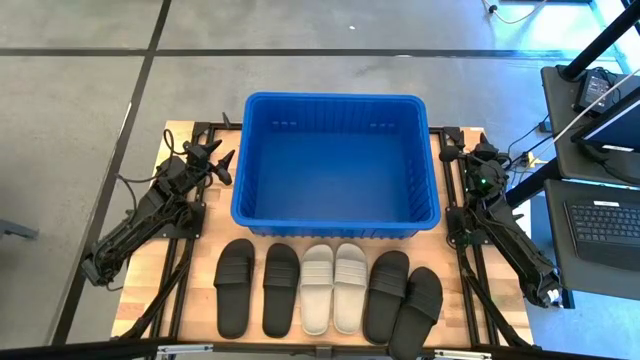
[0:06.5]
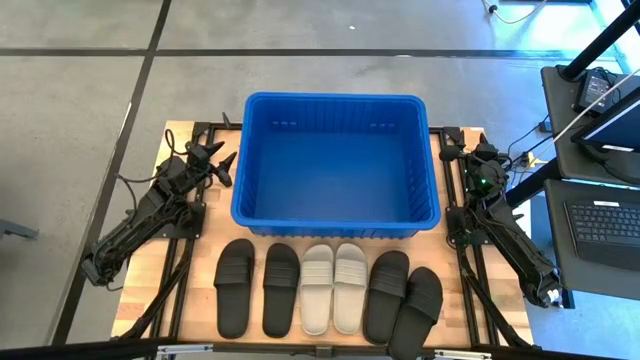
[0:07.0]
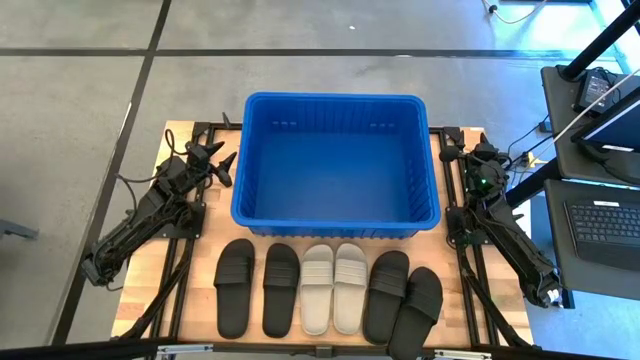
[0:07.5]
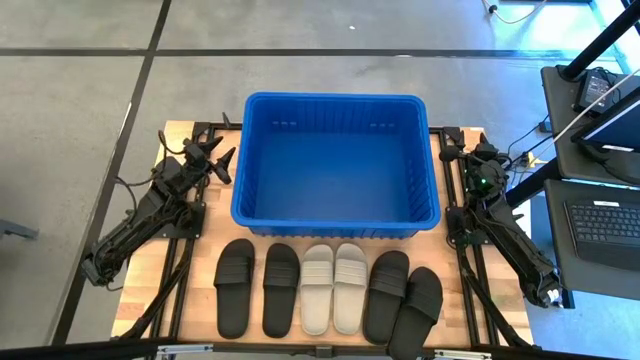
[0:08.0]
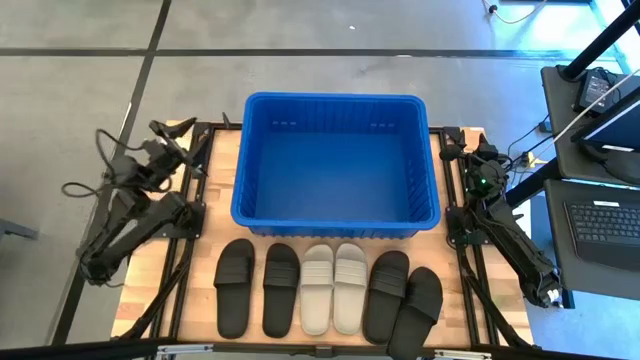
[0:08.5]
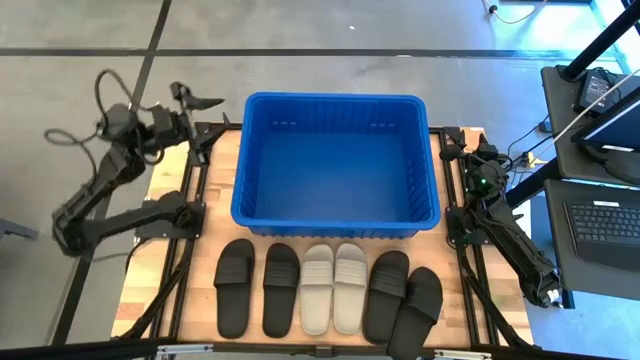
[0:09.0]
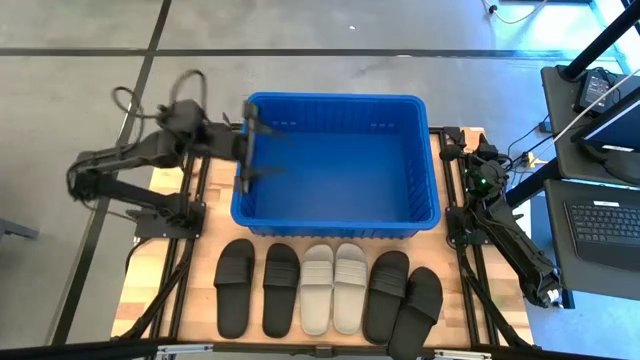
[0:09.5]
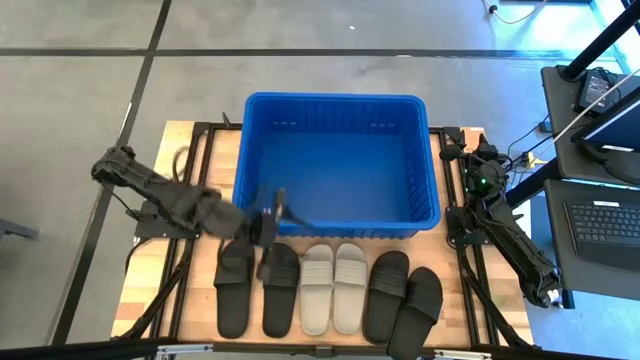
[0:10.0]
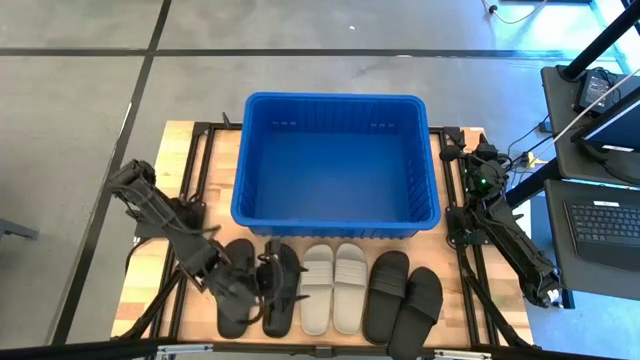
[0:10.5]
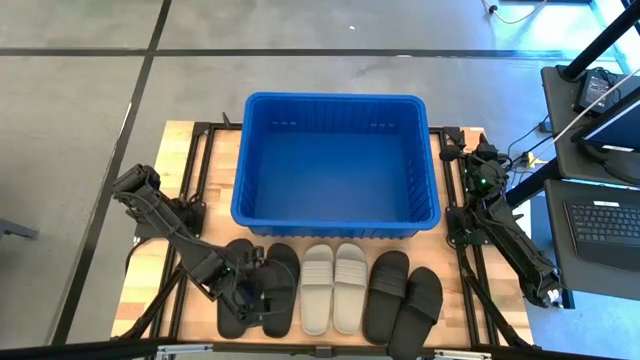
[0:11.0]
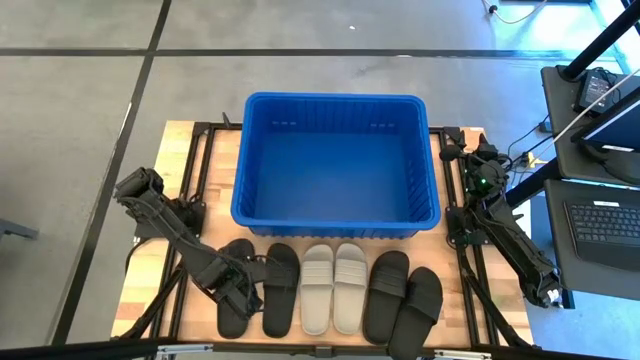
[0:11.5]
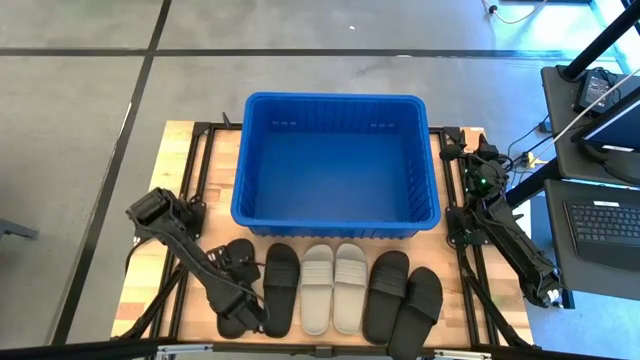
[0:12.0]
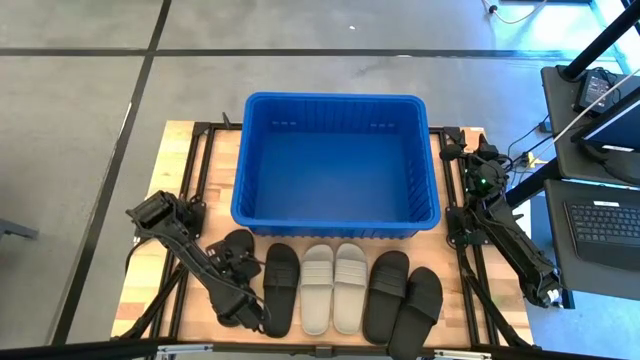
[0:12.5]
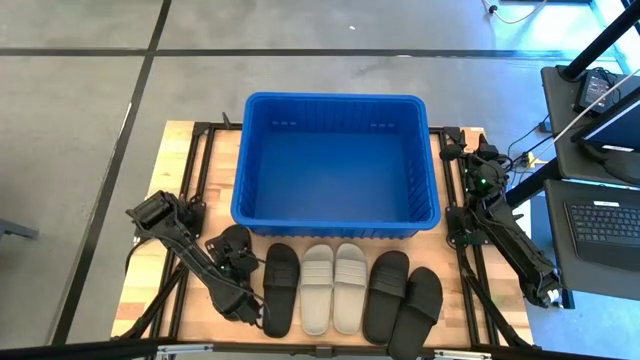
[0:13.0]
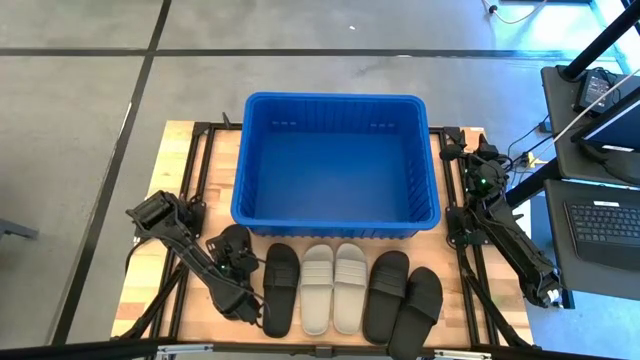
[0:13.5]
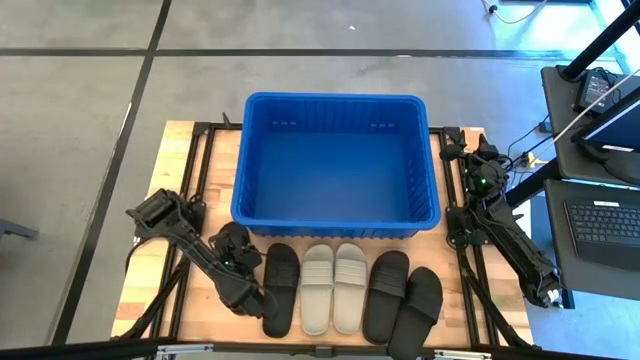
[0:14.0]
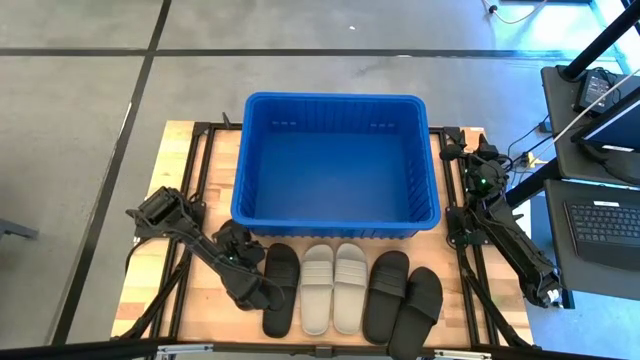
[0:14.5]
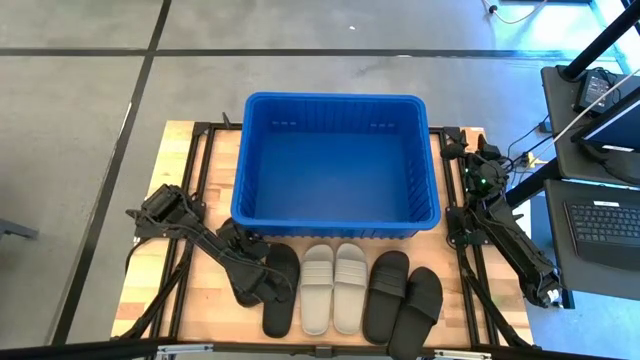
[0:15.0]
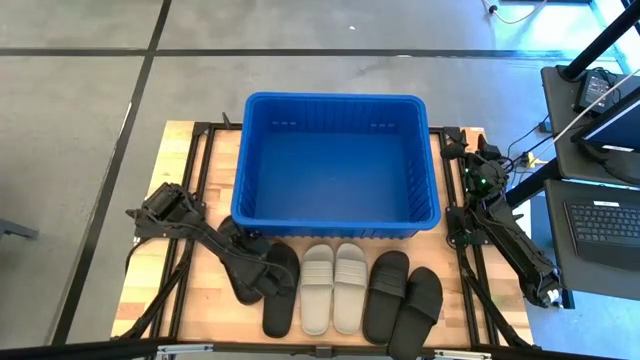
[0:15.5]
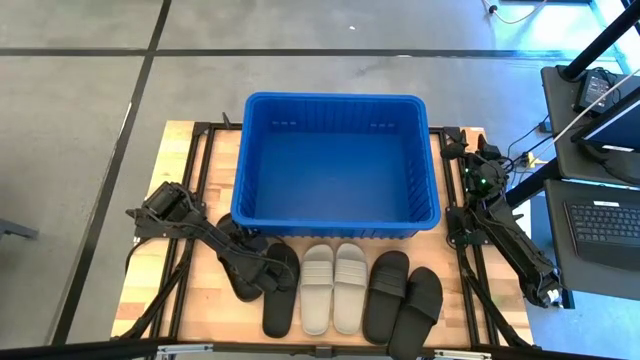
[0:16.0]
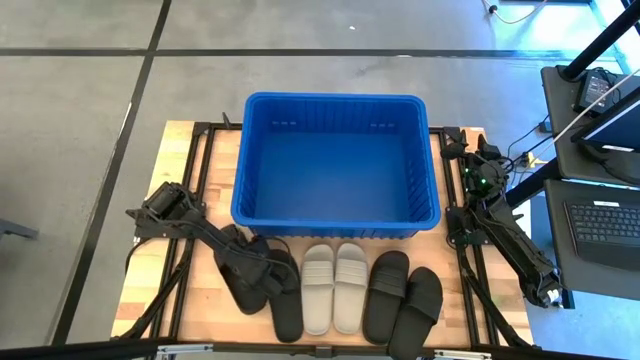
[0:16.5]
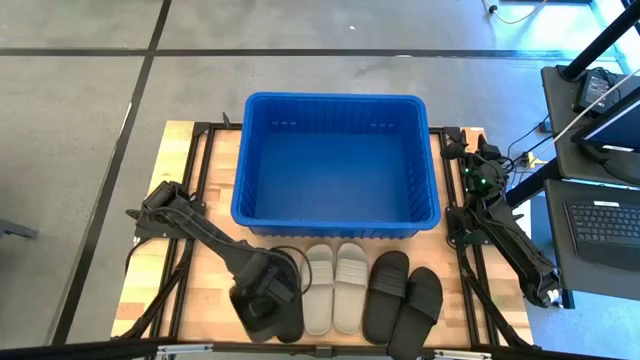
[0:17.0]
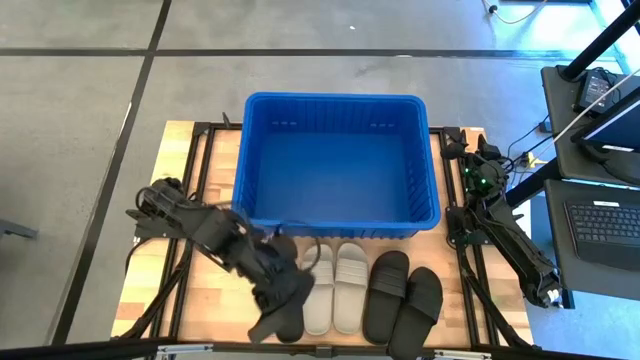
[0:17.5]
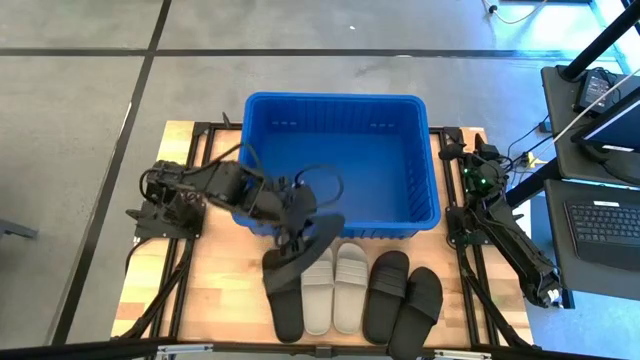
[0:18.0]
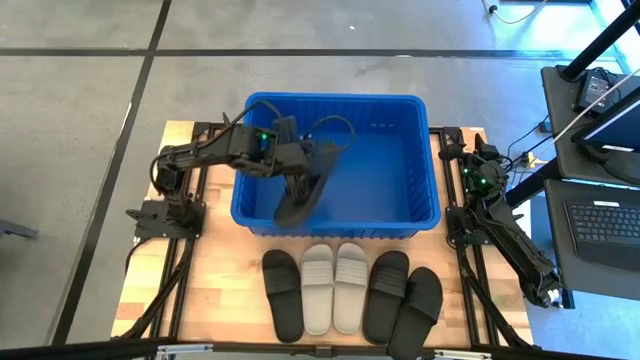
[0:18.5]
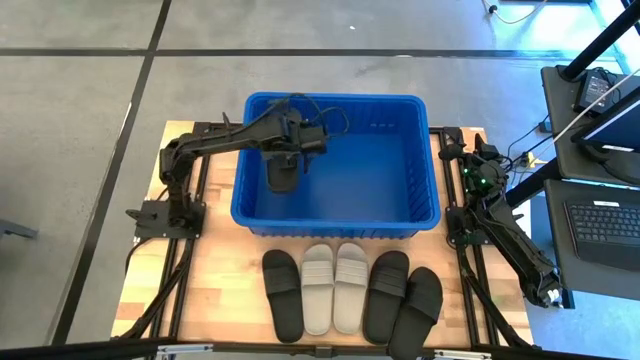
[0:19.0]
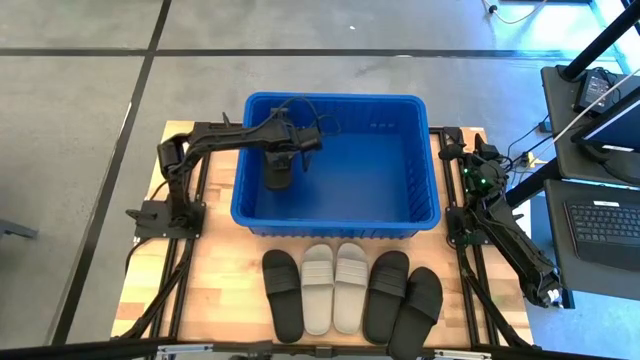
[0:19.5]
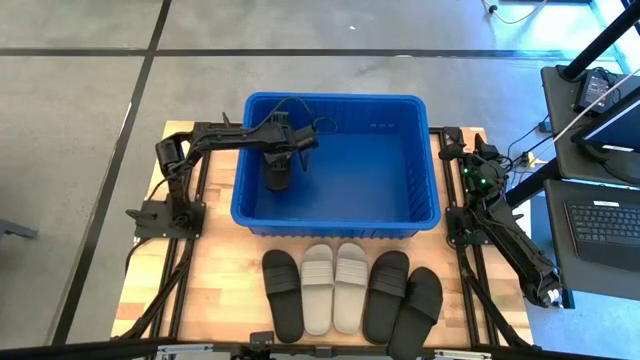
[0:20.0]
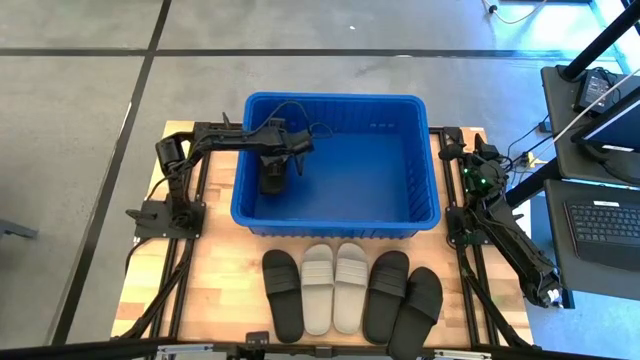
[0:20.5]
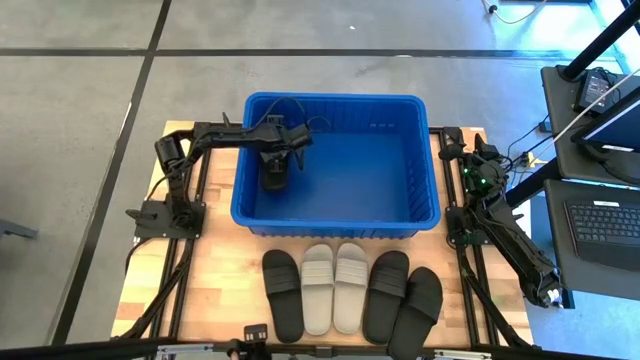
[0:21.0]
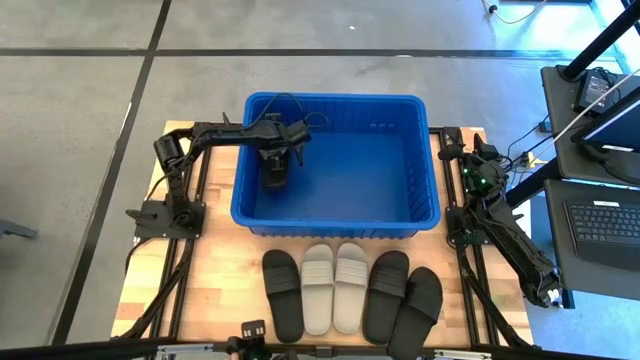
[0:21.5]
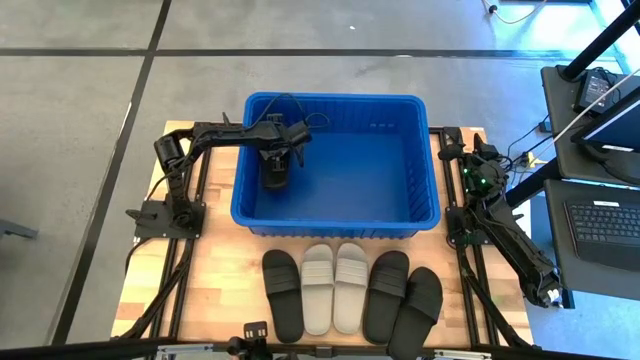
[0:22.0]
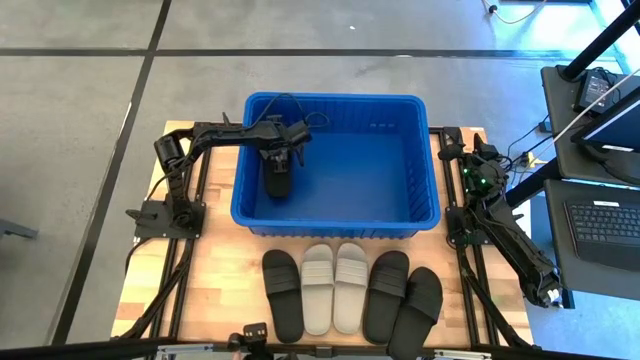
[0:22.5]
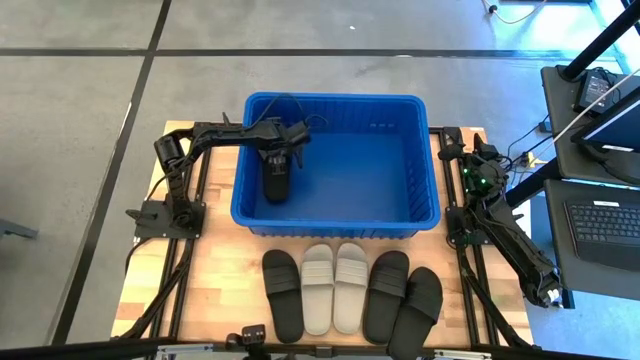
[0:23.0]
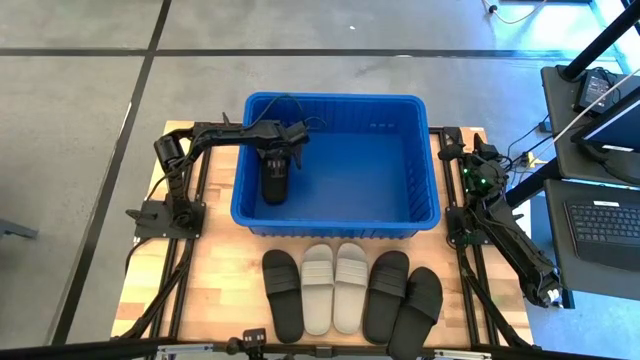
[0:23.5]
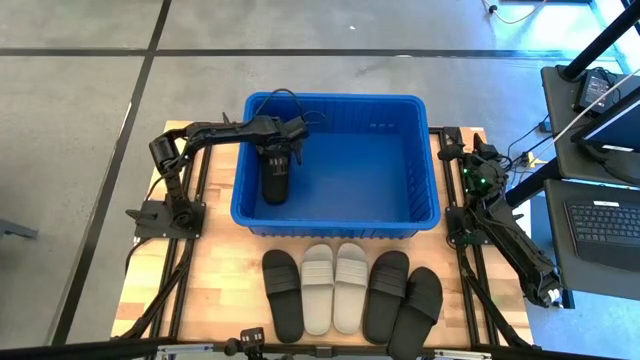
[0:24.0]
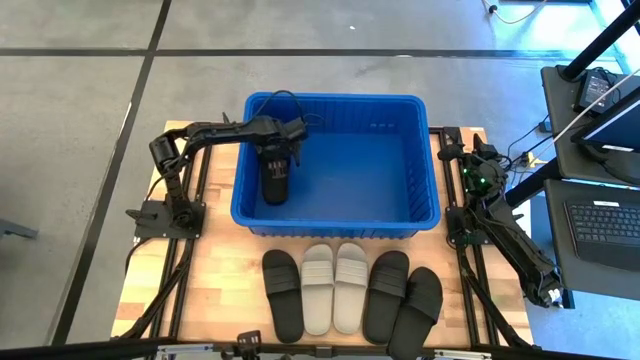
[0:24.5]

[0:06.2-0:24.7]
Task: Pick and place slides into bin
Put the black slipper into the blue container
